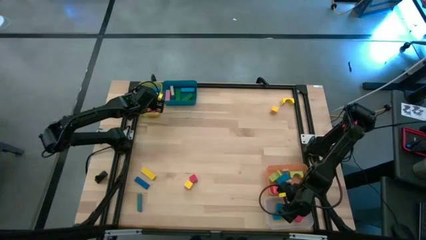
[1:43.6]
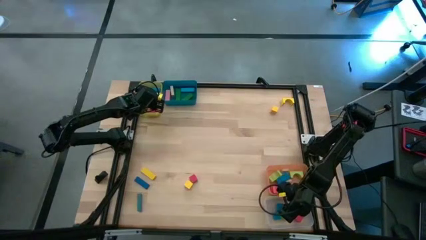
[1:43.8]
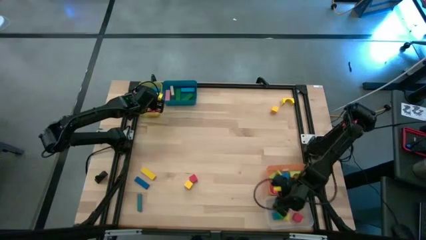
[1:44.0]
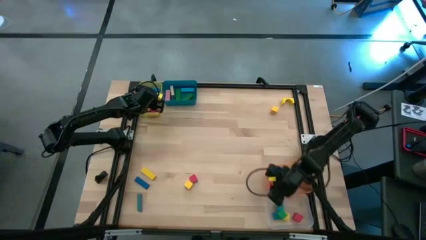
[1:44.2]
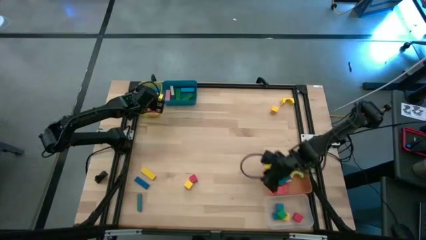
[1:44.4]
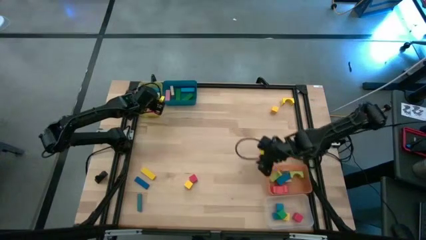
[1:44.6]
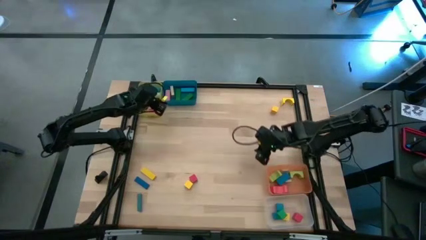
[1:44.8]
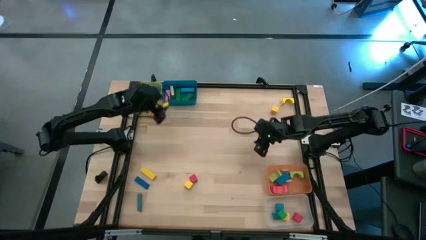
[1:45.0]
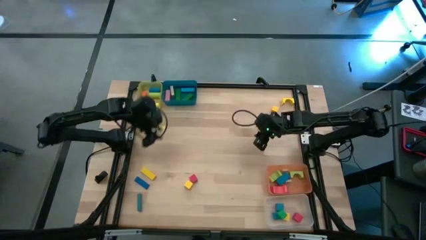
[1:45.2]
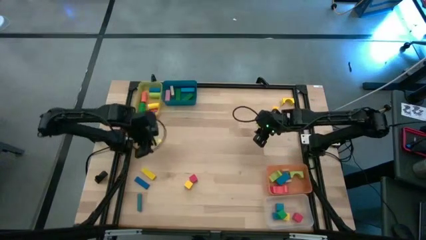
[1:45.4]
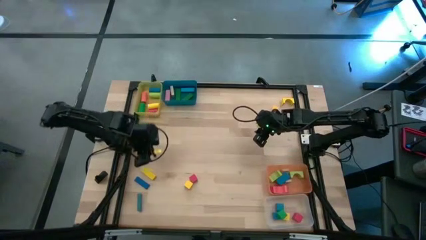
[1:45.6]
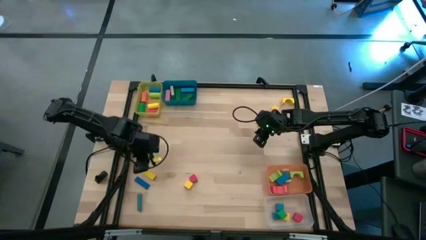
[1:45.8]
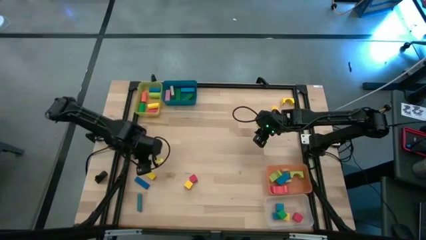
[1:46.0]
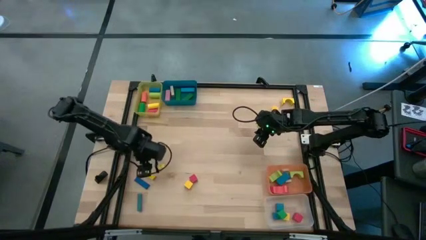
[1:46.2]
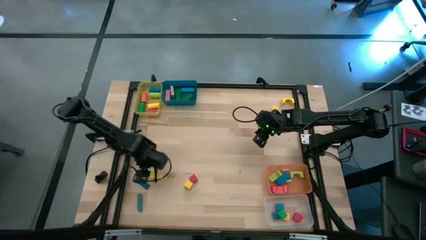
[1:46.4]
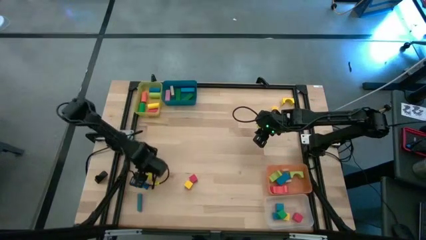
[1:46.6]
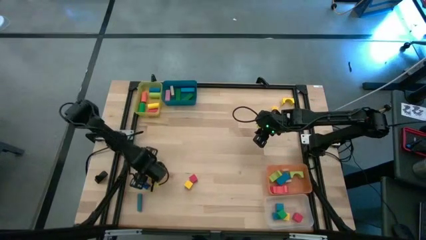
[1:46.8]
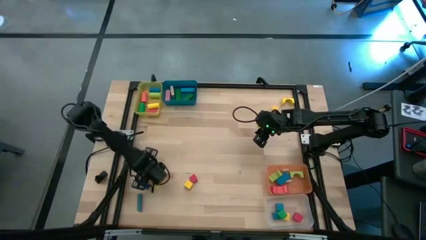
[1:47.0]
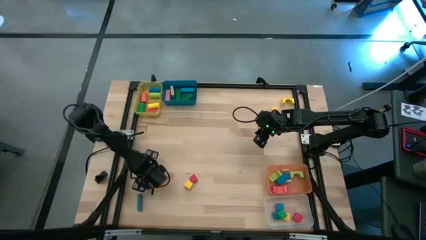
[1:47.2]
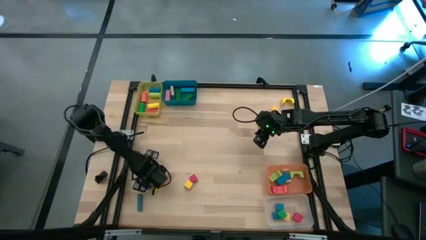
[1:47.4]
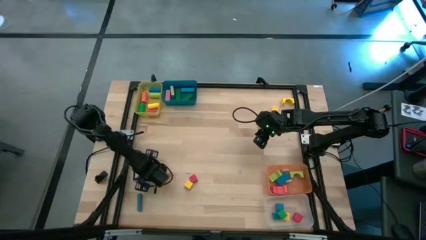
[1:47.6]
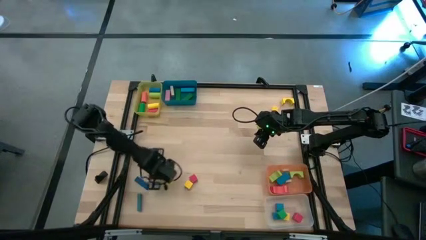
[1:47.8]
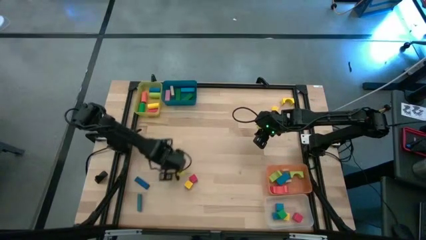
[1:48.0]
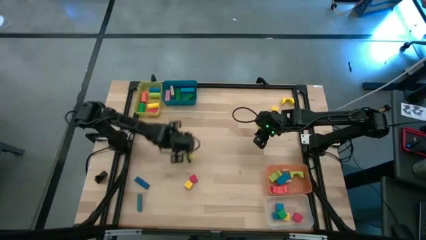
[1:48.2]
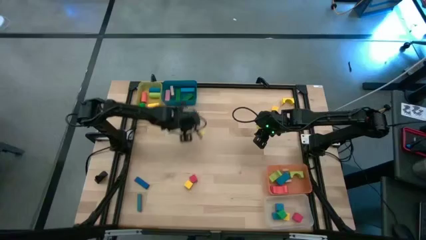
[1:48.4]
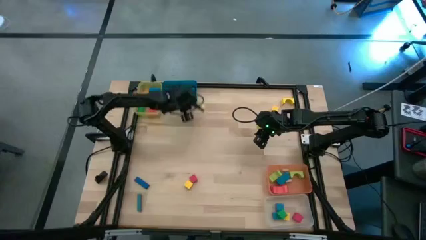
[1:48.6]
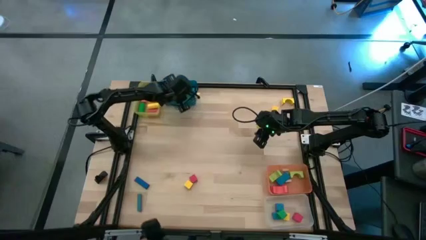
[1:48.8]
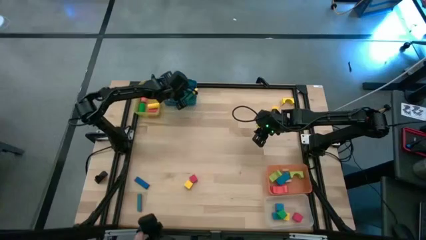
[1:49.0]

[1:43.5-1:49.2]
Task: Sort blocks by size
Put the yellow rectangular block into the blue bin

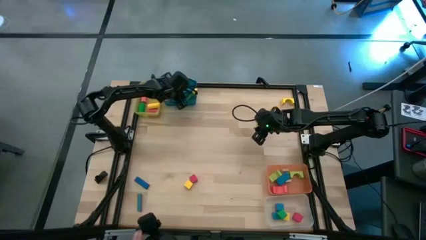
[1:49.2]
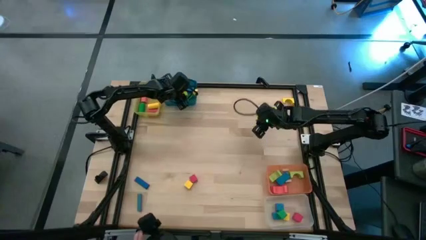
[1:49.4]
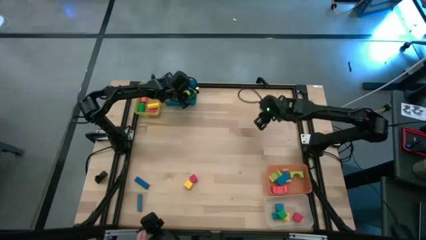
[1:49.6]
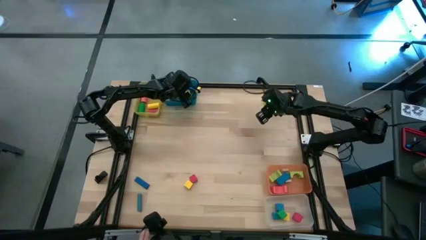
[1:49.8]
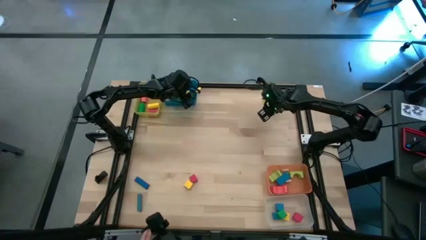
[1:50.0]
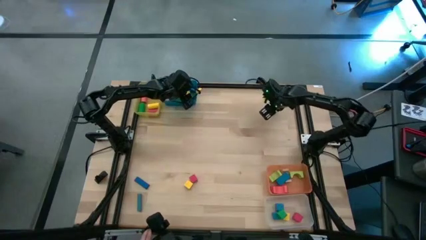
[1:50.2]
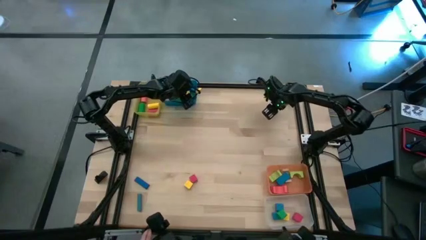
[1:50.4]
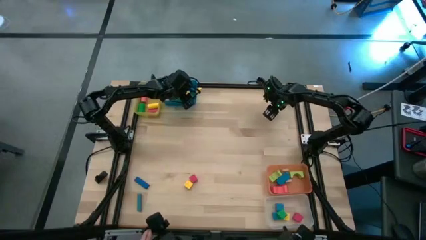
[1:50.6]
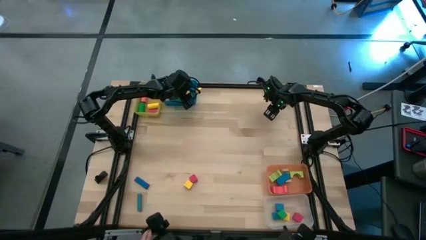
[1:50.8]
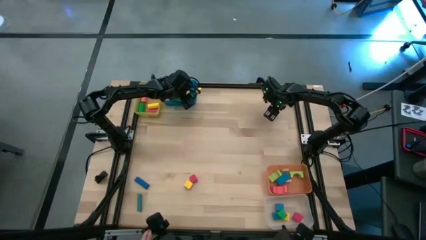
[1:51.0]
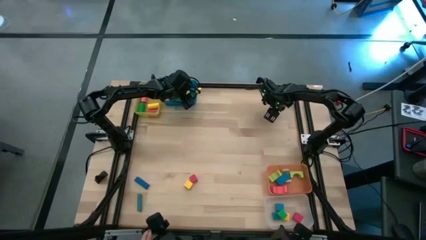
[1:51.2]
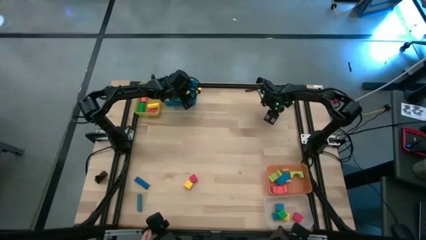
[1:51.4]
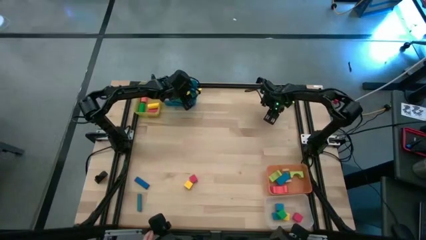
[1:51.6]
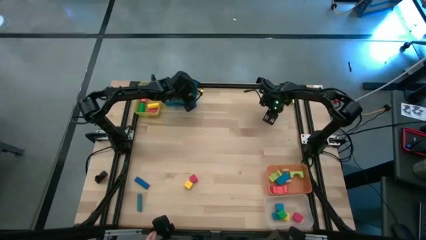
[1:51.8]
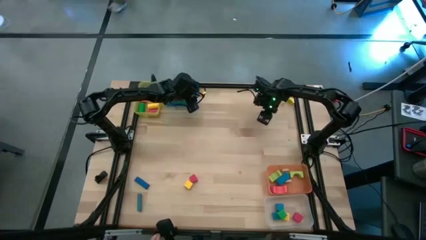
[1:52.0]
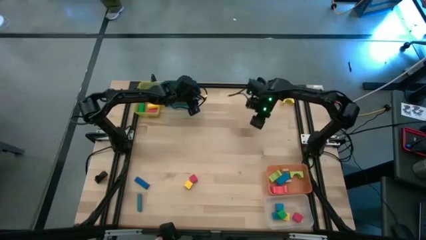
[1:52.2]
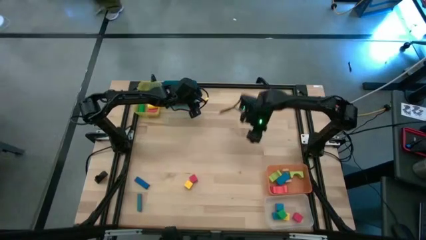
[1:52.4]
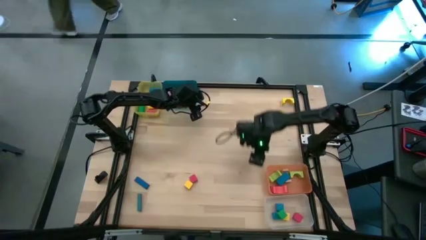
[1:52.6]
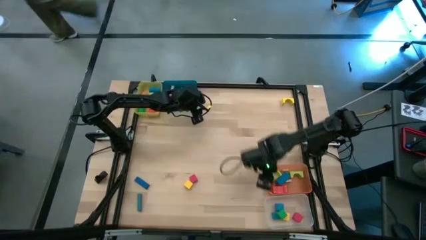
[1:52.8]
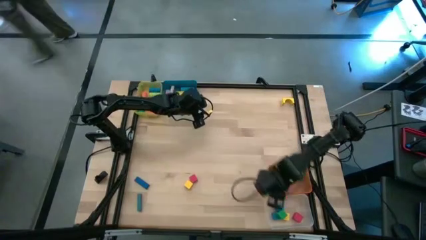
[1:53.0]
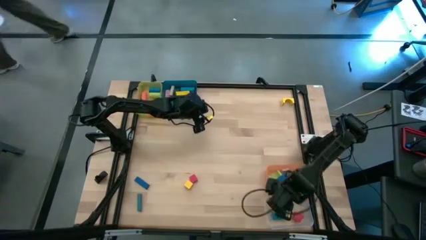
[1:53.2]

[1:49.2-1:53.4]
Put the yellow square block into the transparent bin

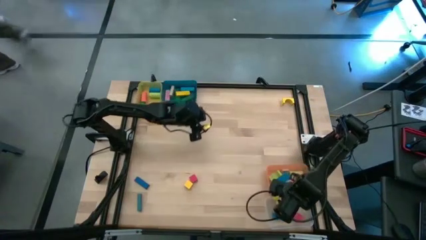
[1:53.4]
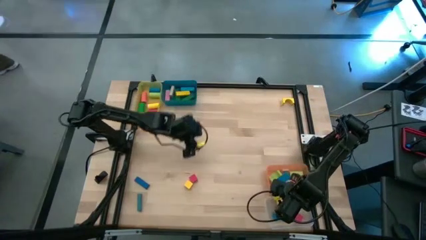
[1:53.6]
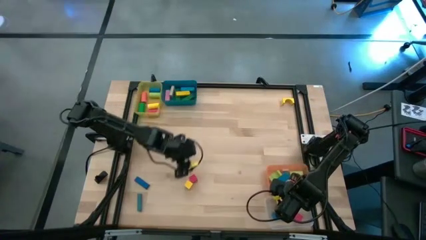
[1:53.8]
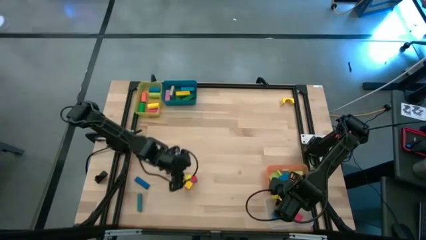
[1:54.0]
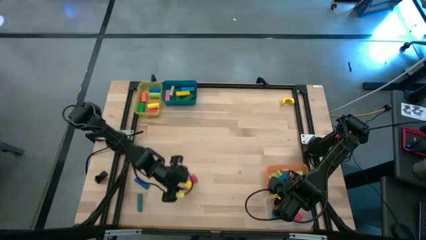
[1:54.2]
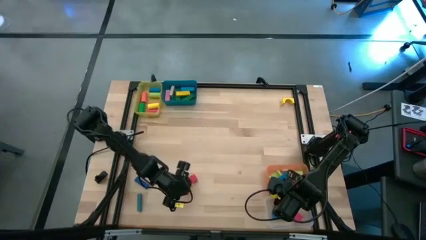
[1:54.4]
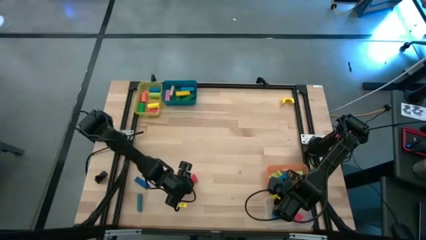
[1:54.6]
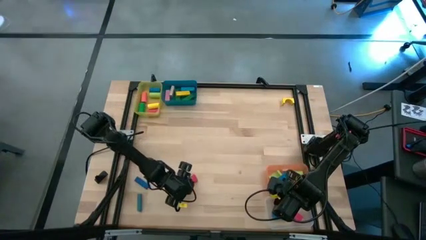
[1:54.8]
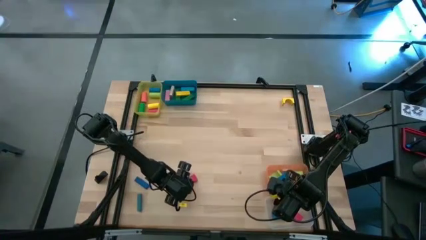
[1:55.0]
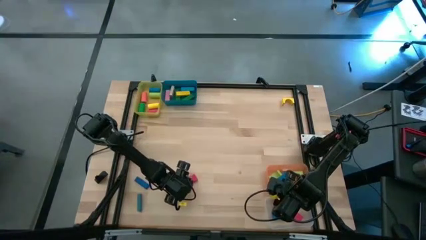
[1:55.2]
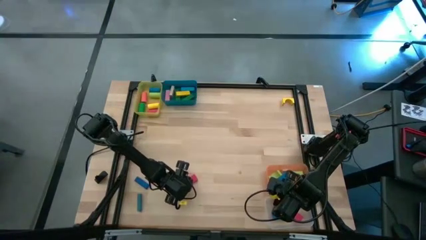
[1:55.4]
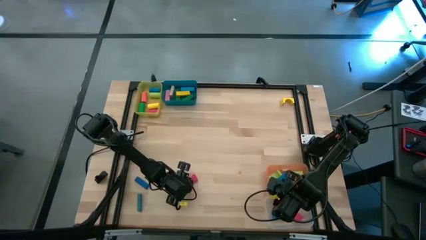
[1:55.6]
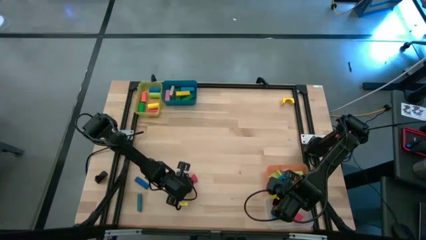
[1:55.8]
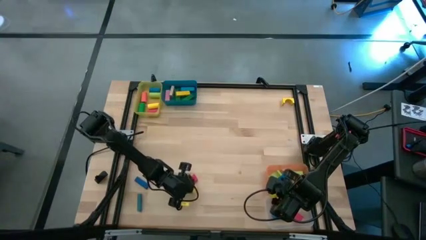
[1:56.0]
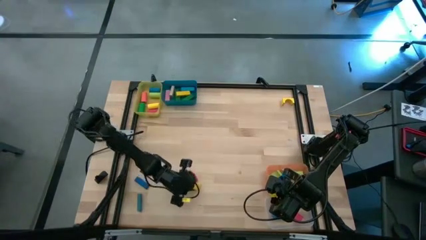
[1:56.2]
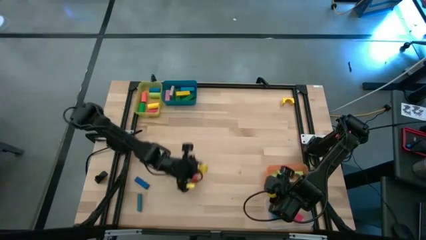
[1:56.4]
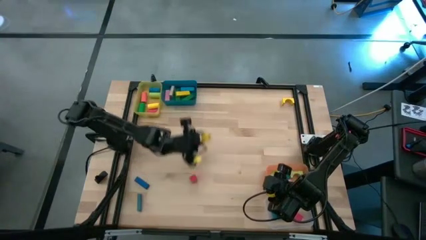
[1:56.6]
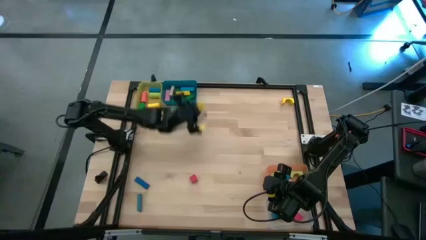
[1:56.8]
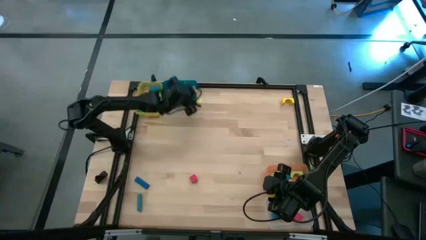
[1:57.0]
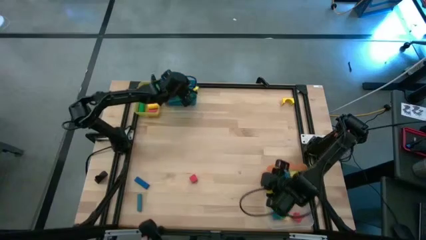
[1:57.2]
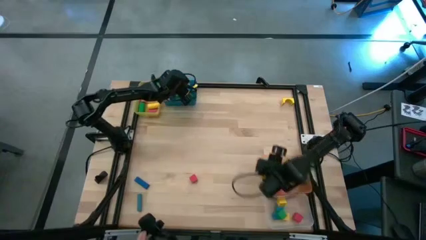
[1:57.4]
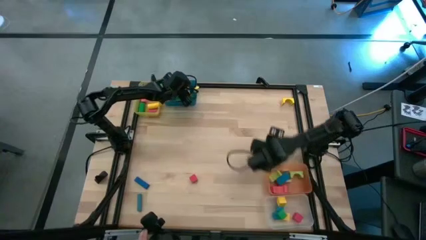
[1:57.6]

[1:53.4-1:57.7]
Put the yellow square block into the transparent bin

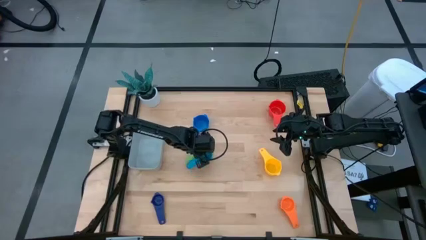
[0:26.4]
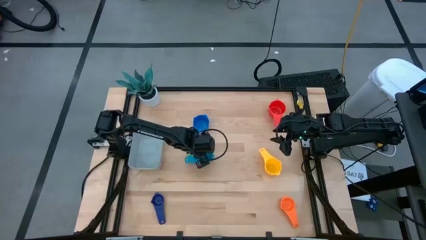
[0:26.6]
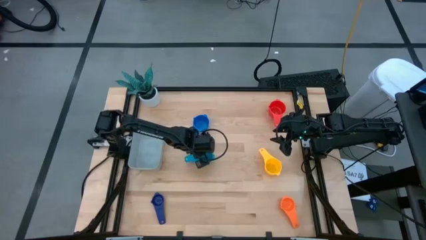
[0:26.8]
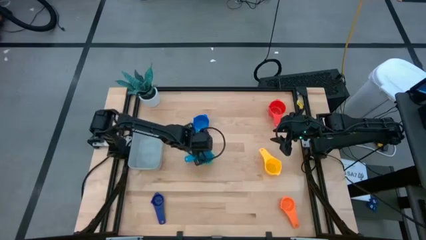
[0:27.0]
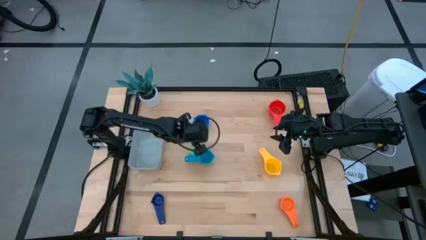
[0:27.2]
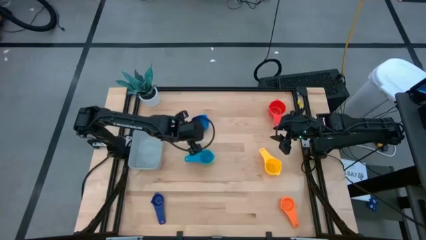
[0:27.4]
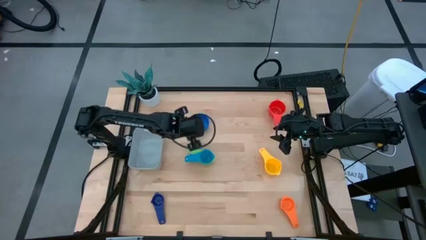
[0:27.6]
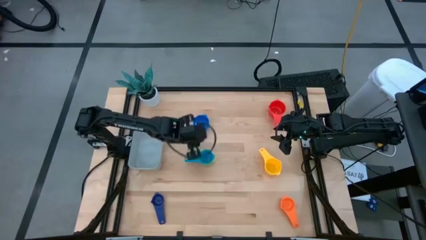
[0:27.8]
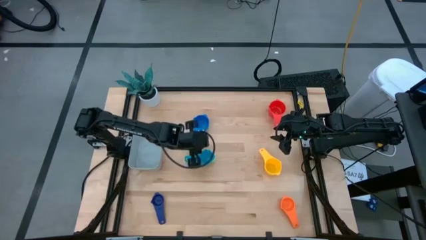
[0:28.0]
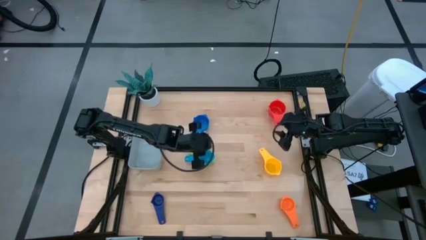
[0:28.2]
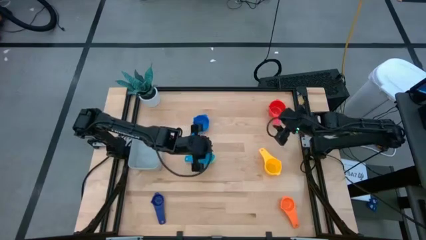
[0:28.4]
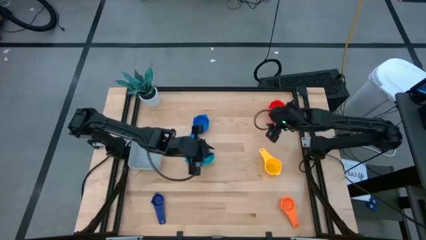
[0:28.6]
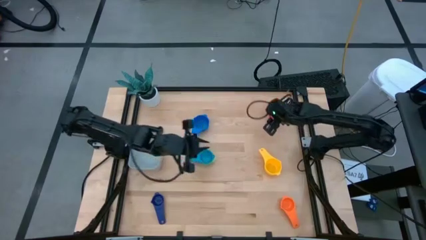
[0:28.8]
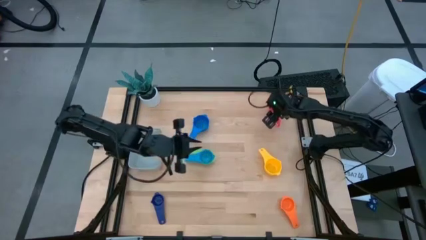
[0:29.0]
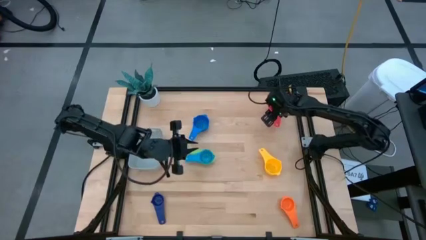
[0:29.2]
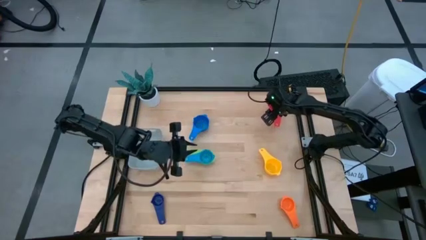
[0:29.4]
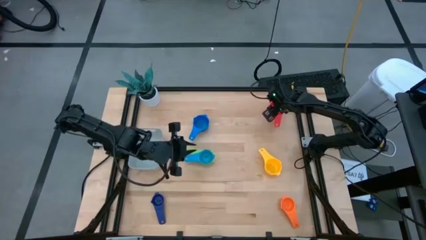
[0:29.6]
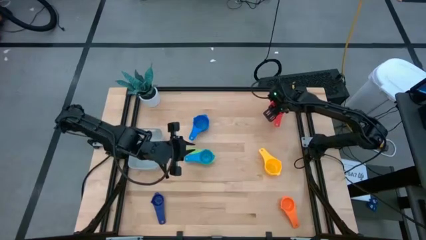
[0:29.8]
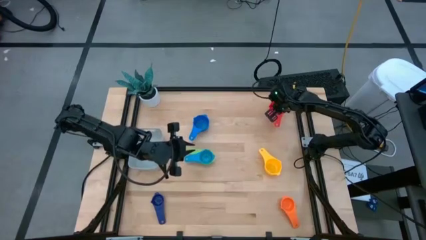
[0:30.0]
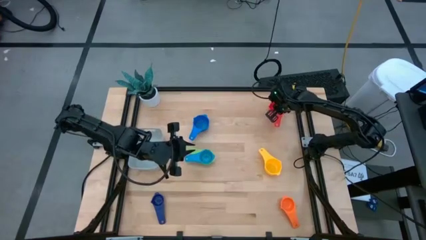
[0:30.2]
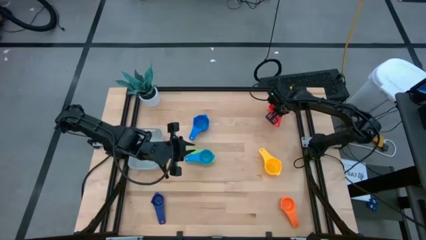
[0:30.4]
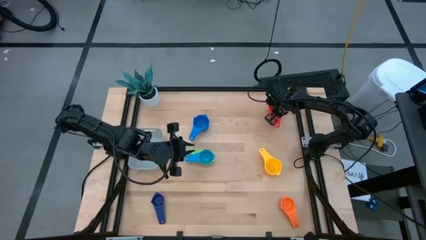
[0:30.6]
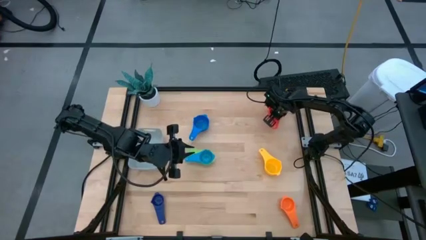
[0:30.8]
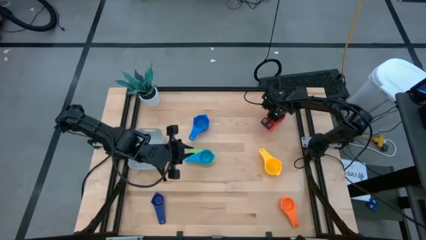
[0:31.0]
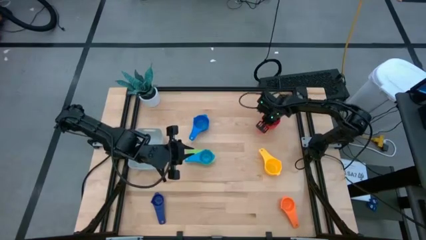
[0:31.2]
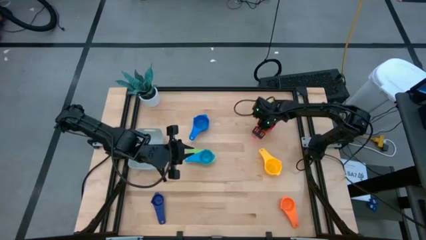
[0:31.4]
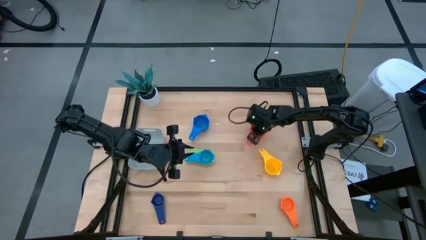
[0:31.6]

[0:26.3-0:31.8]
Task: Nest measuring cups in basket
Move the red measuring cup to the center of the table
